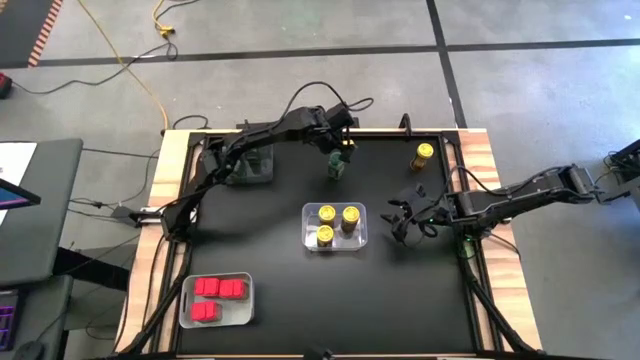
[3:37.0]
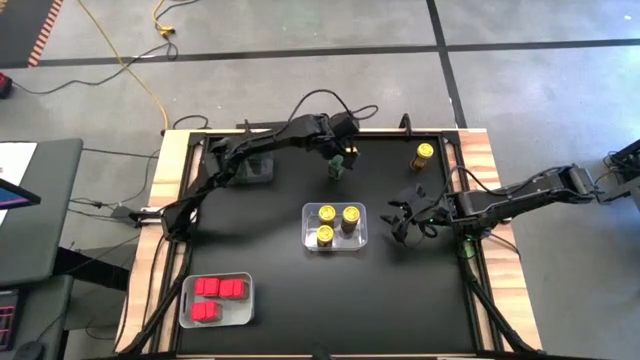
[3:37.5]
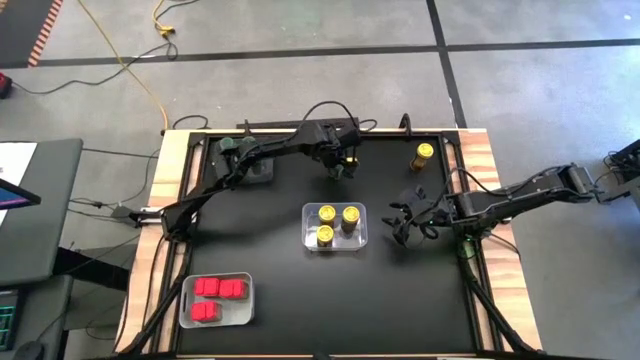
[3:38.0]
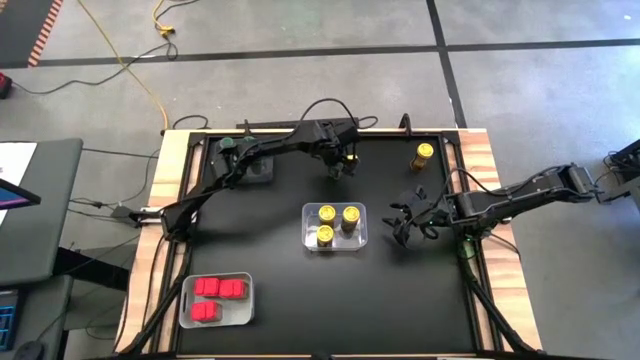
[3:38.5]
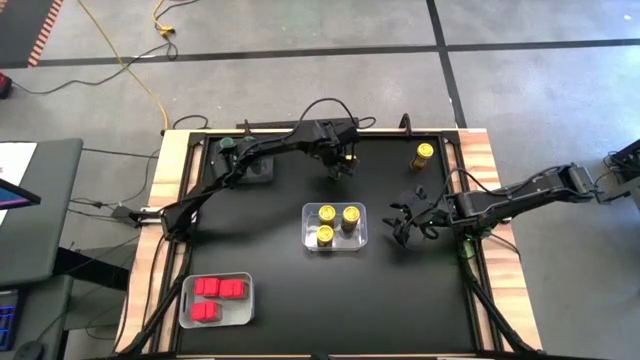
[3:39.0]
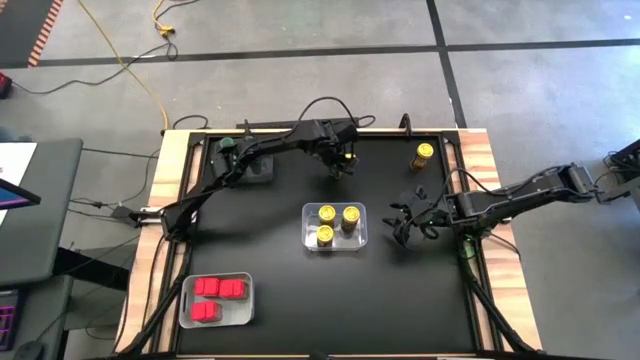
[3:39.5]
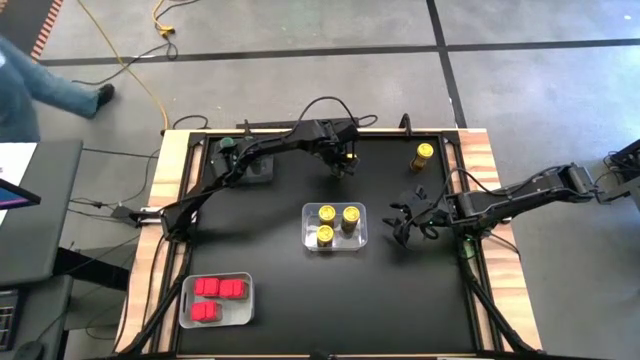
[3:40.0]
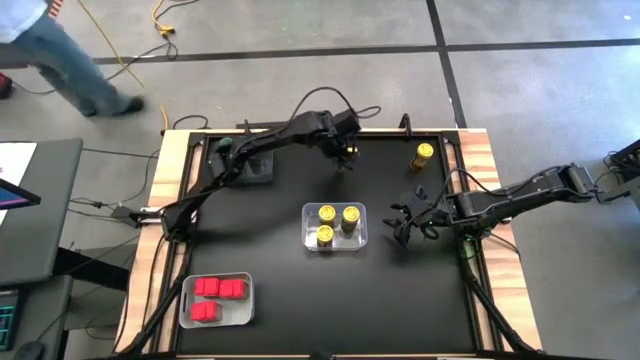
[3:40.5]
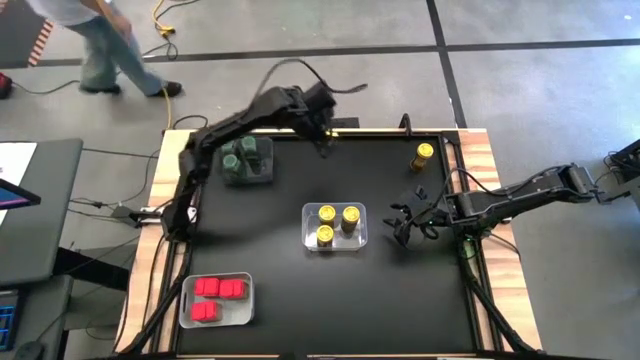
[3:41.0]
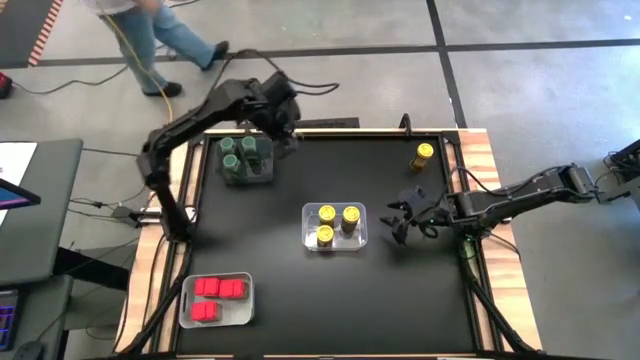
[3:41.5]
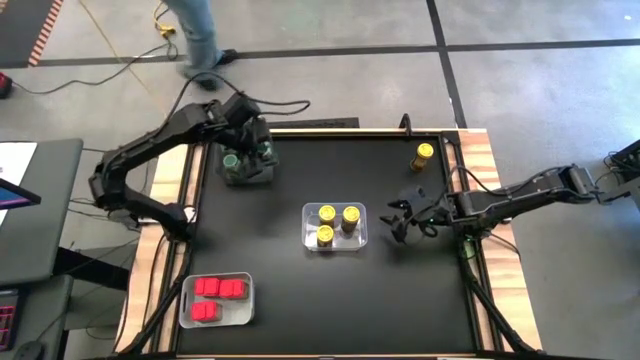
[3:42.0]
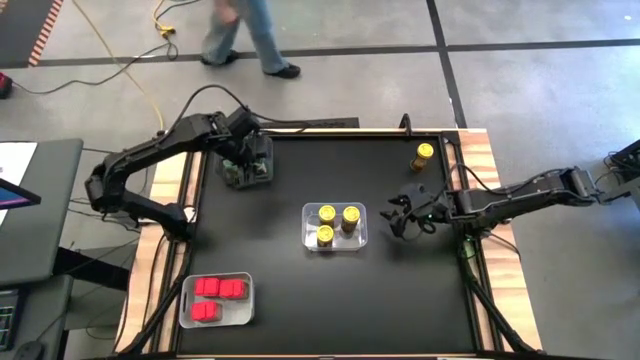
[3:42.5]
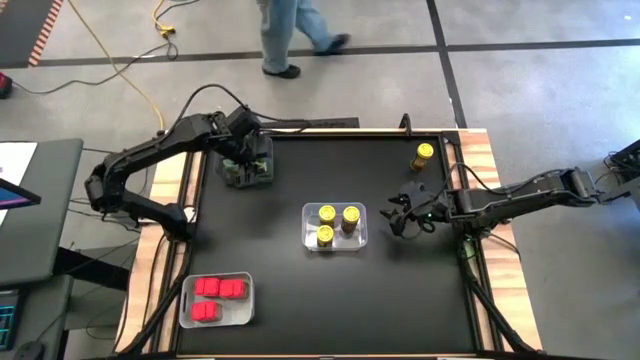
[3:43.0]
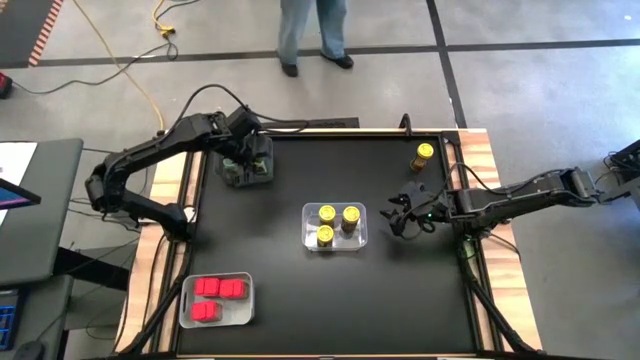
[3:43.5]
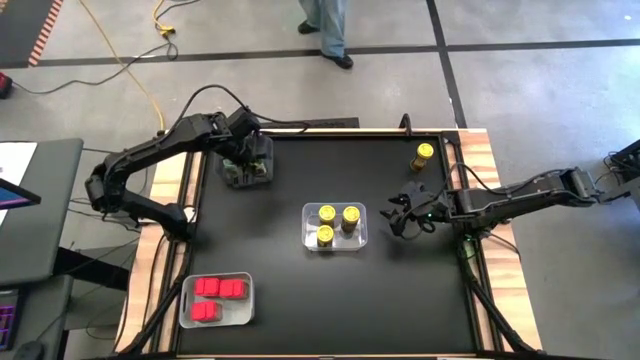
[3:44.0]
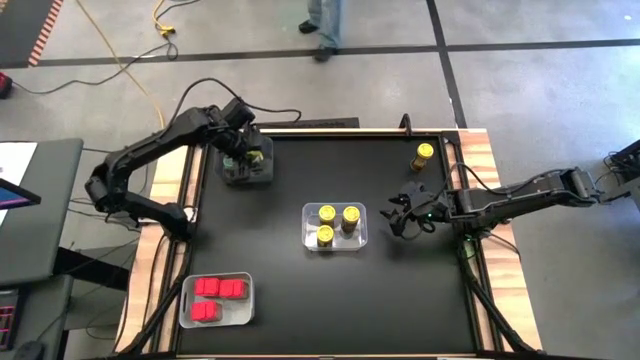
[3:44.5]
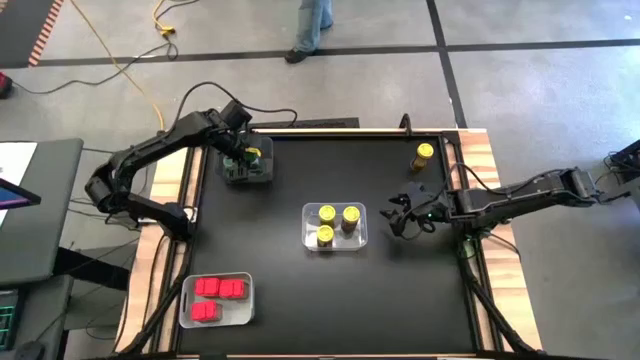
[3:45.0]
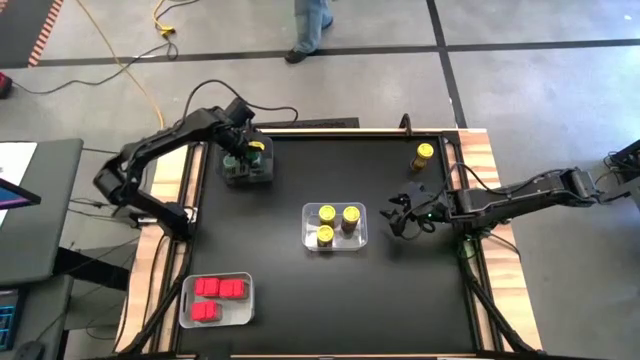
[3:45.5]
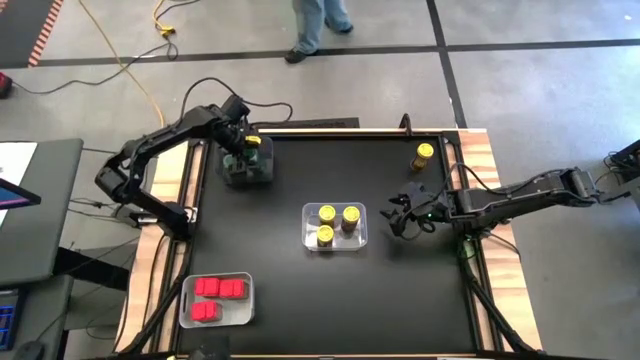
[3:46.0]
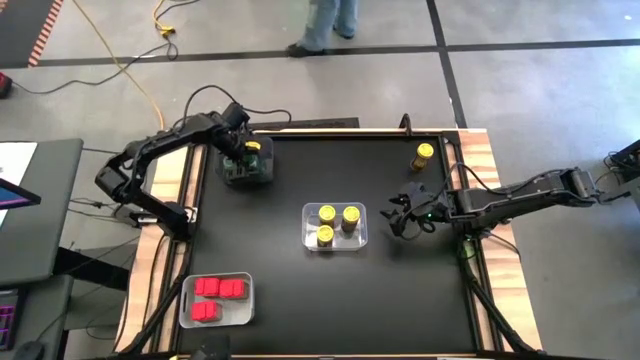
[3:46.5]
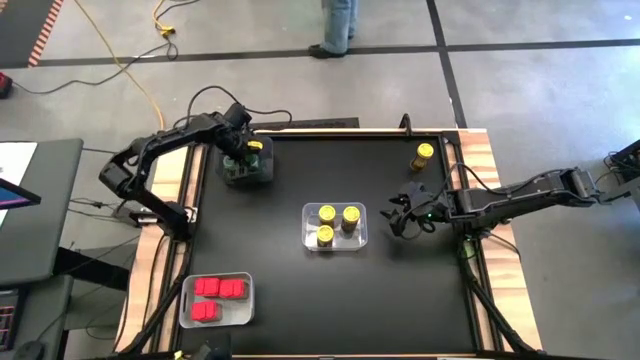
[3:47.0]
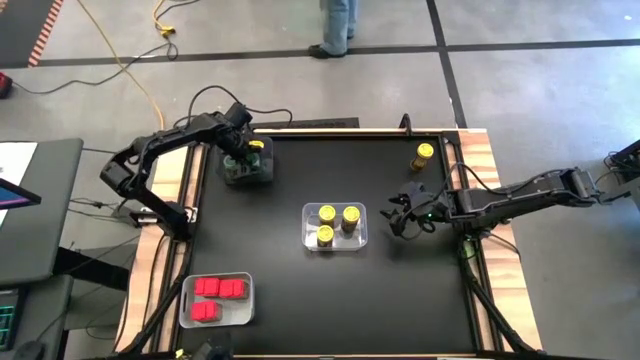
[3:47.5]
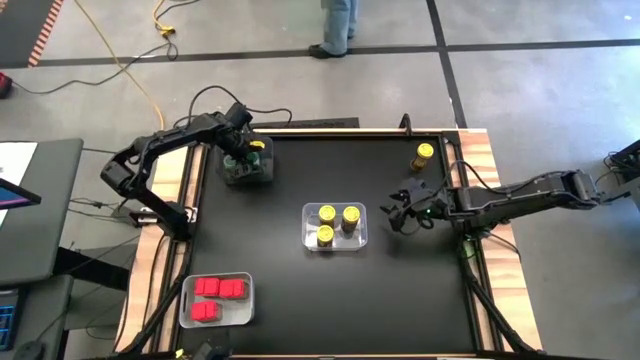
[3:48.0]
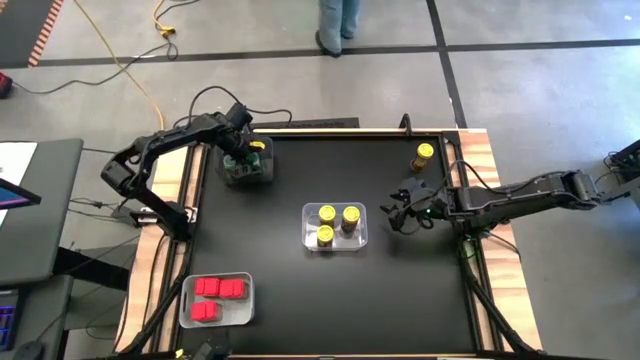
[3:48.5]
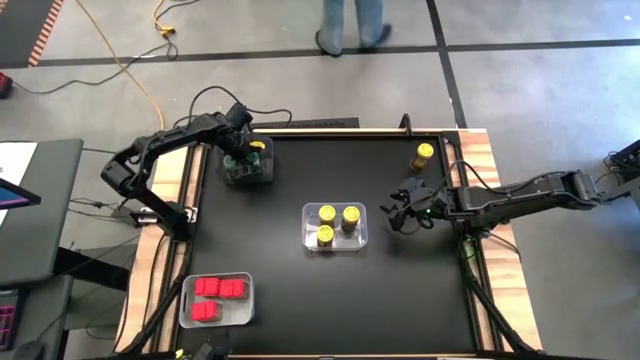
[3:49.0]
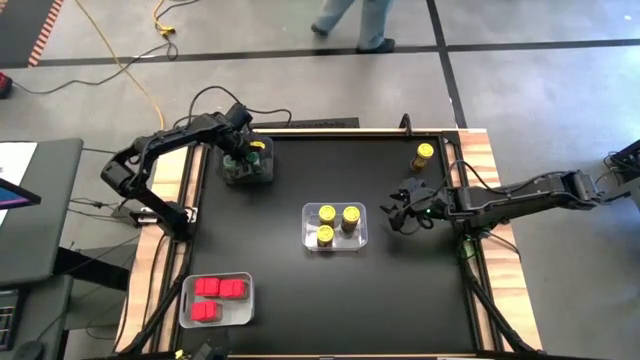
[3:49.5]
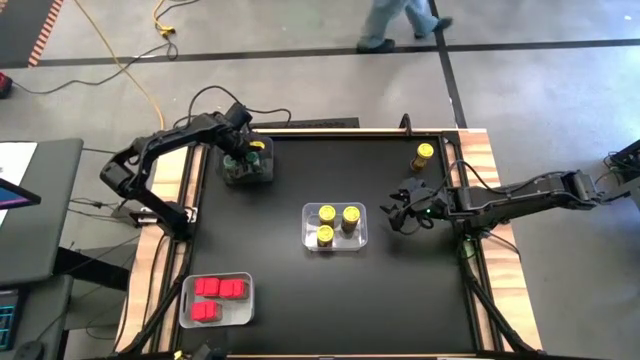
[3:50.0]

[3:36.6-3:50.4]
Task: Sort spices by type
Put the green seasoning bottle into the transparent bin

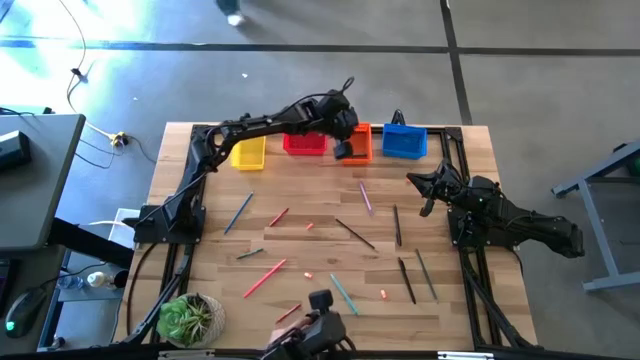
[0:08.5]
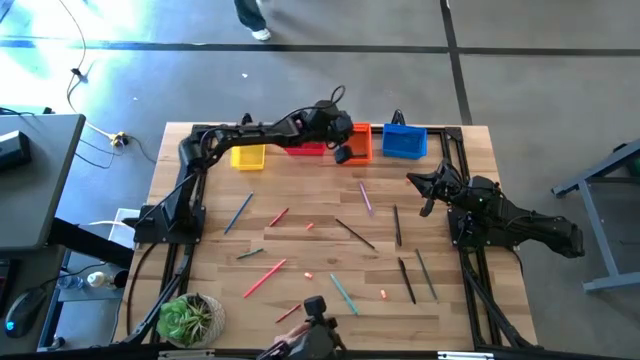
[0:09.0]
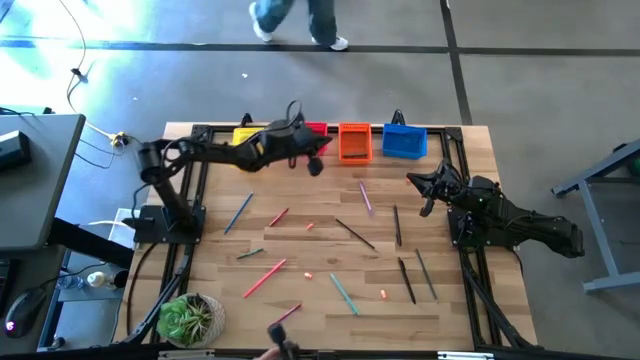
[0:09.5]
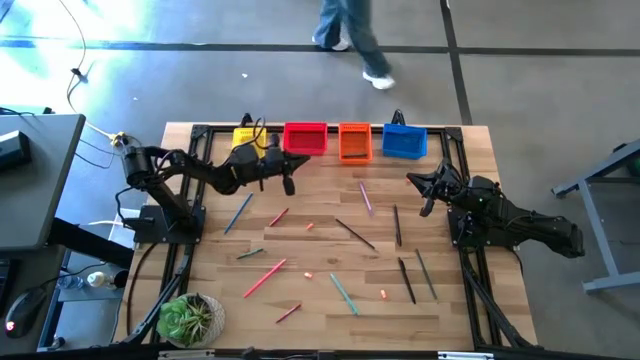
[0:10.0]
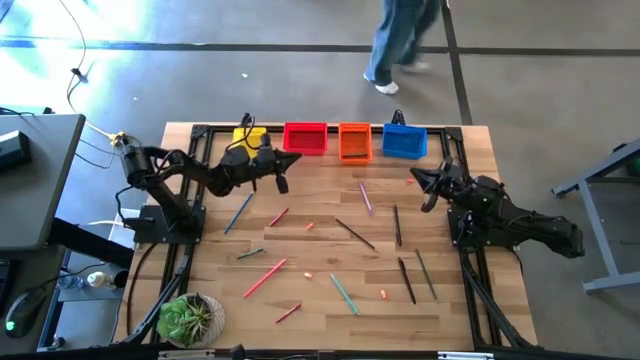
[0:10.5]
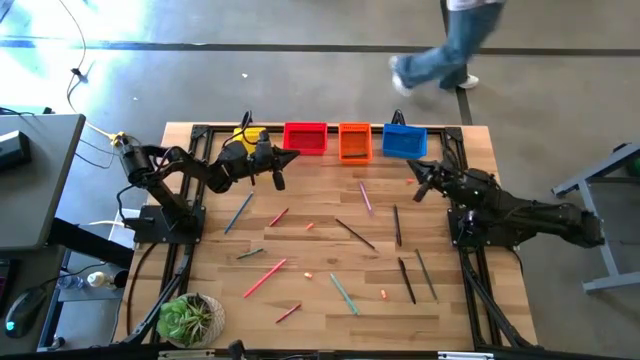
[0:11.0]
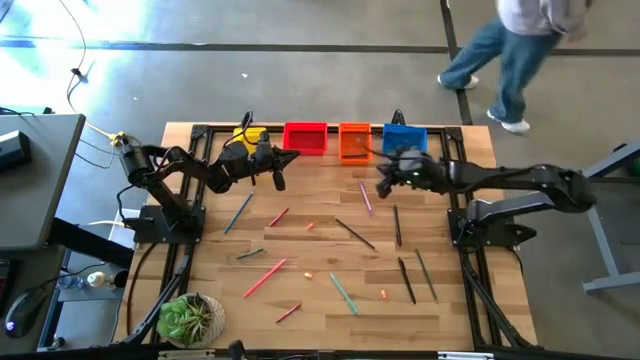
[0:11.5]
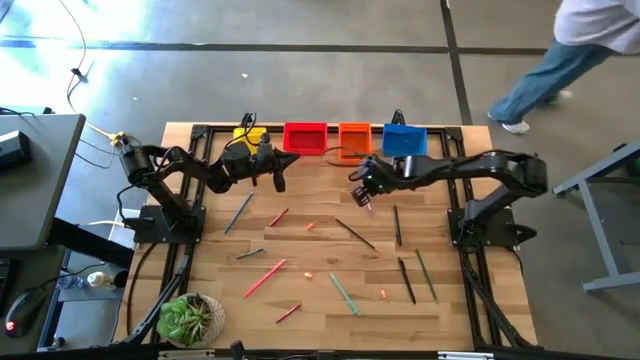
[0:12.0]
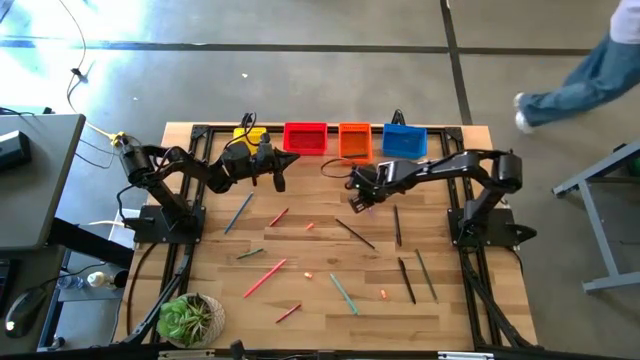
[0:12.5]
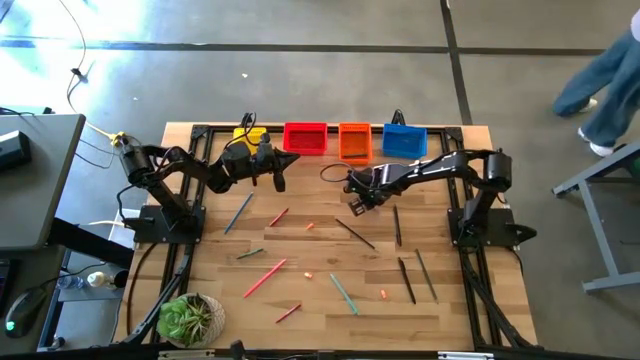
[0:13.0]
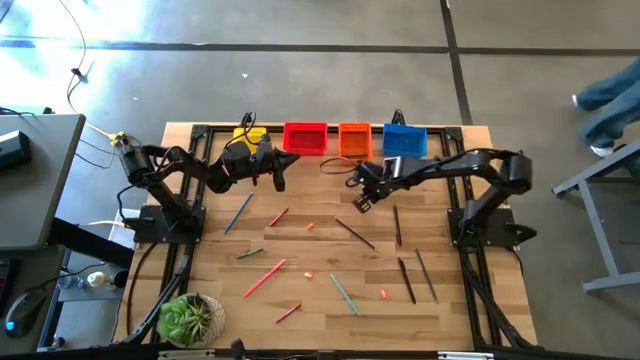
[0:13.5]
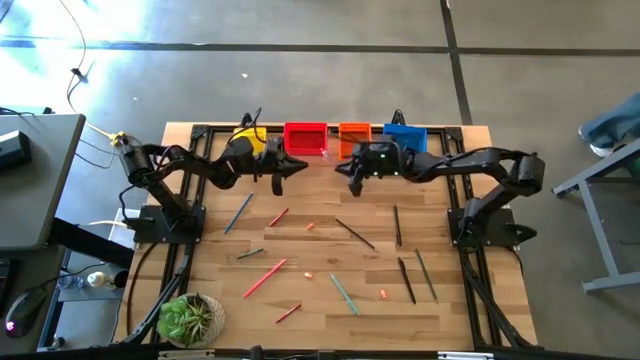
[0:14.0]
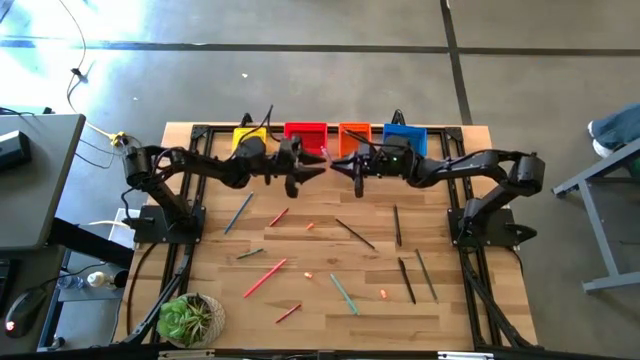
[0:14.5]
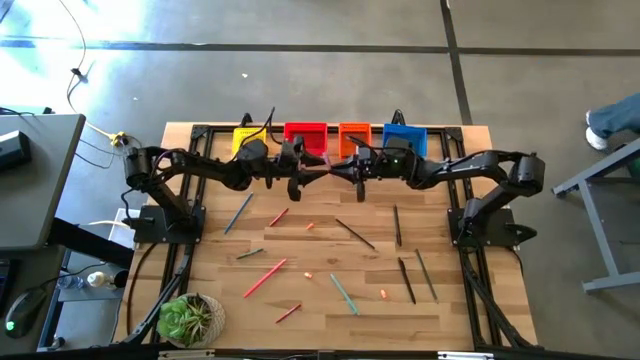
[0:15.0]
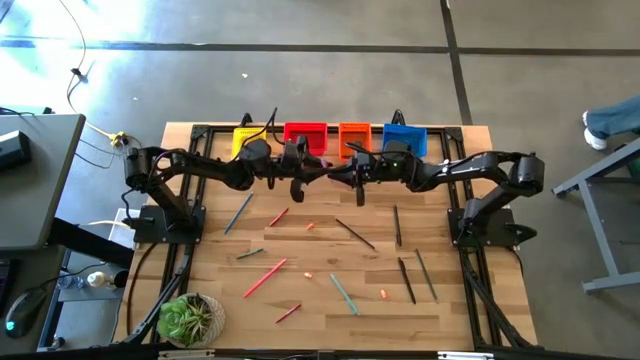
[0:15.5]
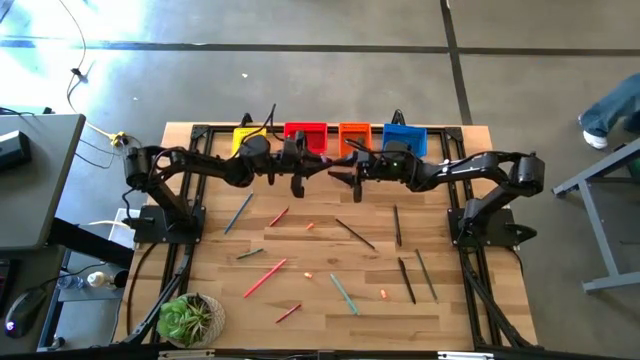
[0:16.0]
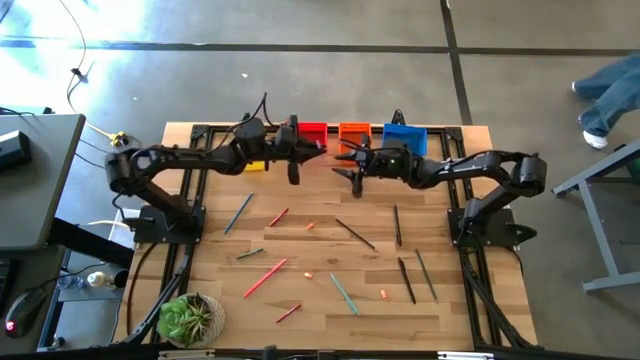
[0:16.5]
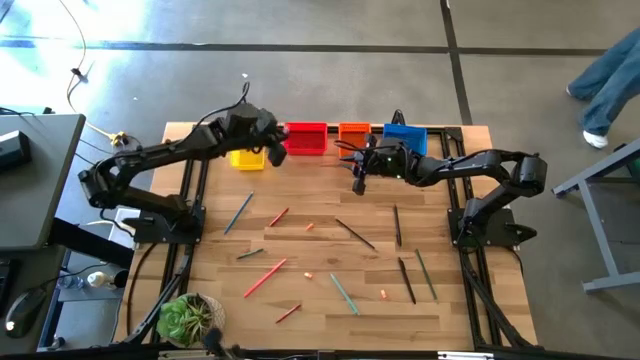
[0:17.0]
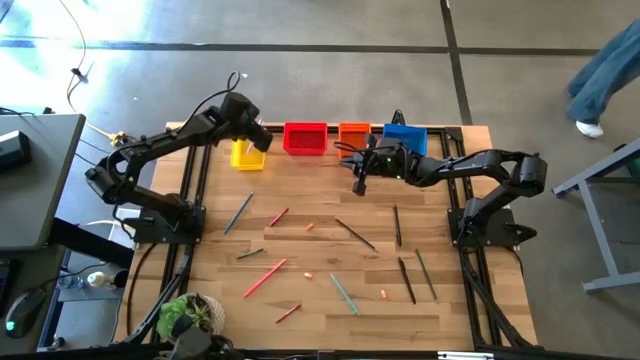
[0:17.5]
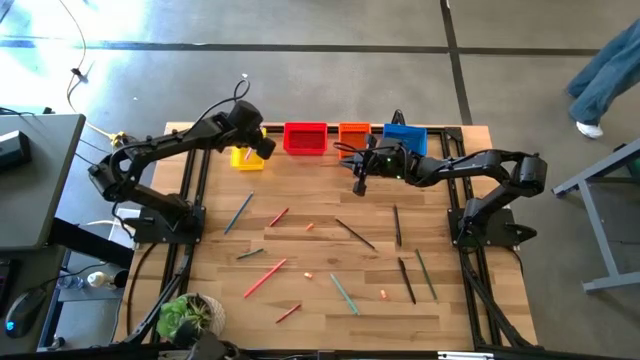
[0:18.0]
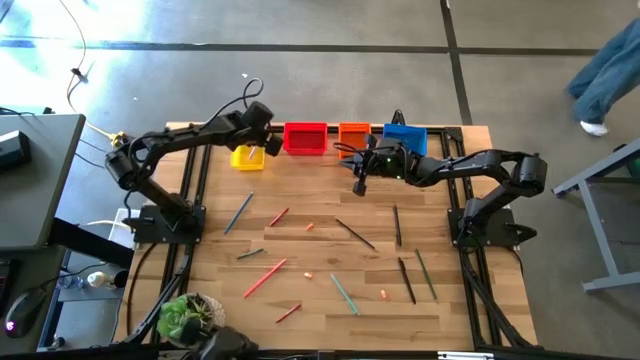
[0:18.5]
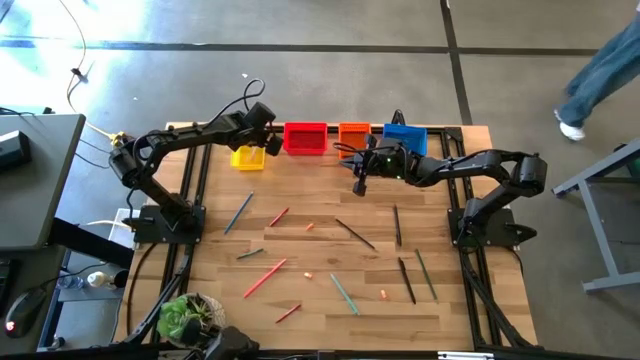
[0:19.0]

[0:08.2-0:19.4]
Task: Sort crayons/erasers/pens/pencils in bins
Put the purple pen into the yellow basket
